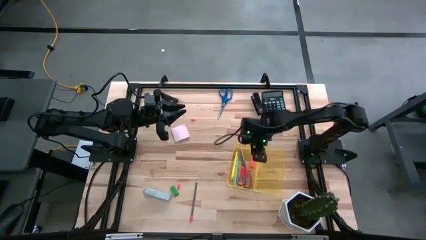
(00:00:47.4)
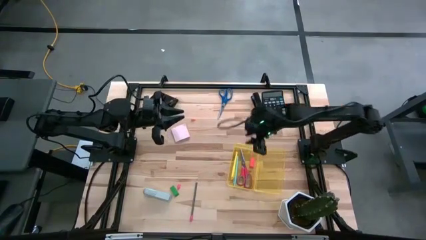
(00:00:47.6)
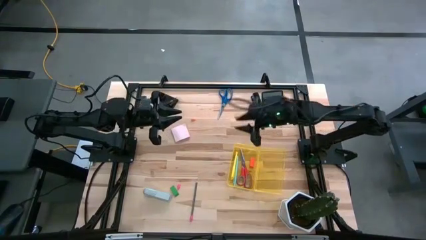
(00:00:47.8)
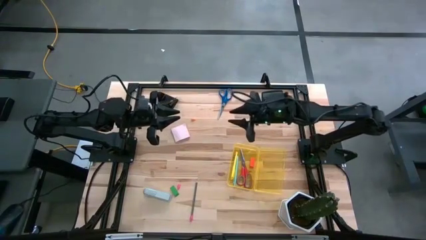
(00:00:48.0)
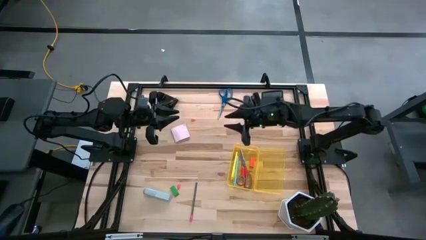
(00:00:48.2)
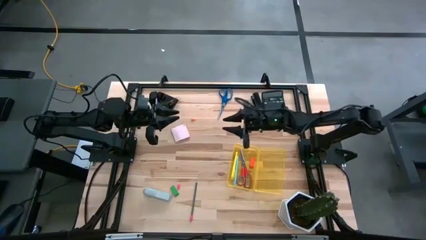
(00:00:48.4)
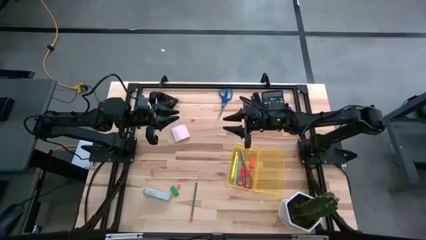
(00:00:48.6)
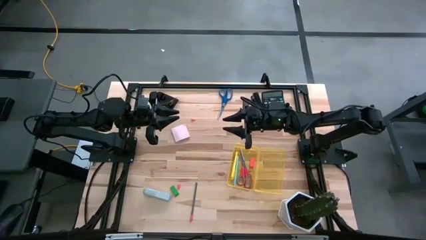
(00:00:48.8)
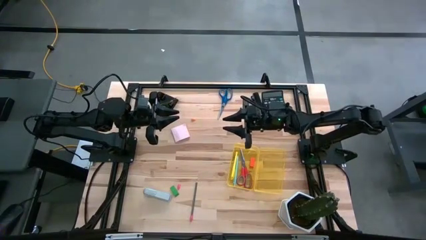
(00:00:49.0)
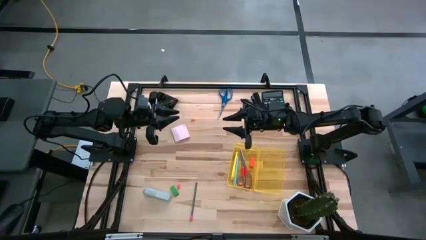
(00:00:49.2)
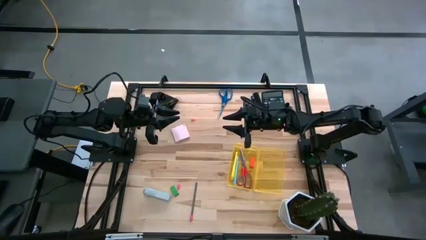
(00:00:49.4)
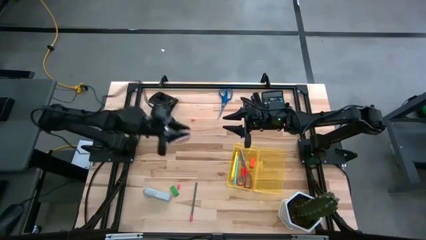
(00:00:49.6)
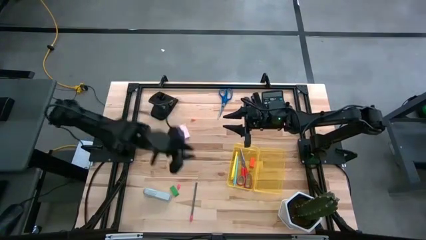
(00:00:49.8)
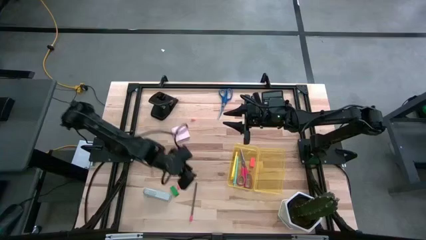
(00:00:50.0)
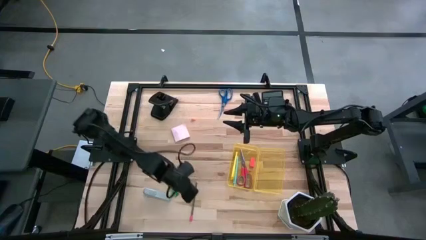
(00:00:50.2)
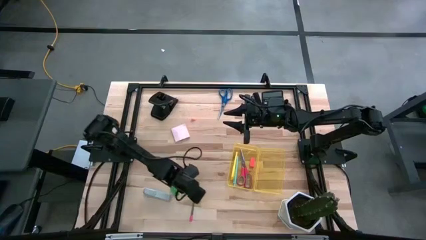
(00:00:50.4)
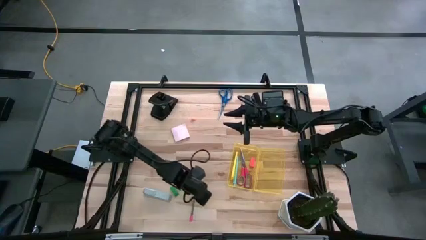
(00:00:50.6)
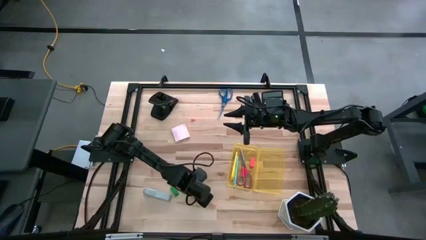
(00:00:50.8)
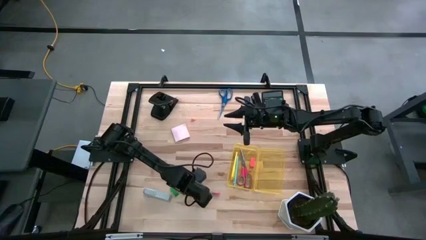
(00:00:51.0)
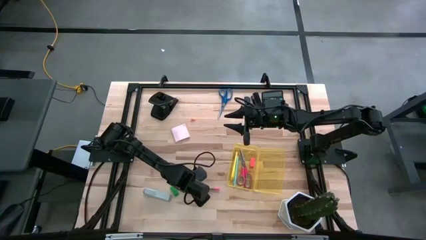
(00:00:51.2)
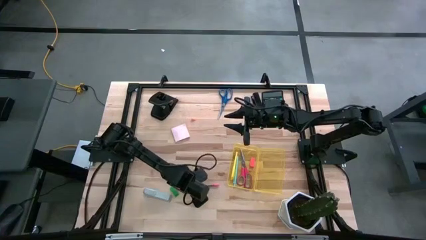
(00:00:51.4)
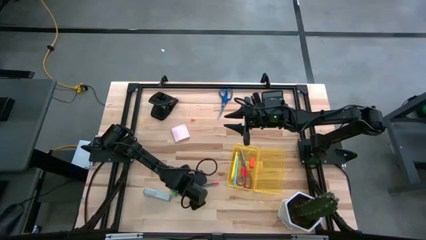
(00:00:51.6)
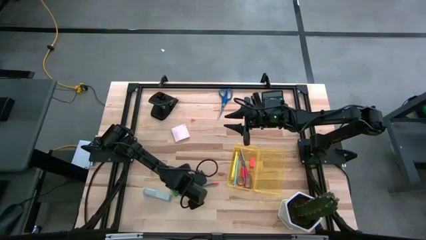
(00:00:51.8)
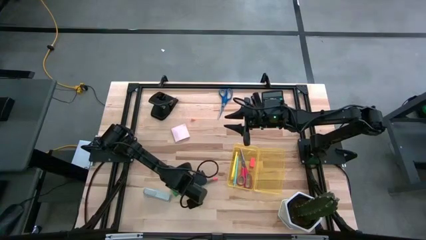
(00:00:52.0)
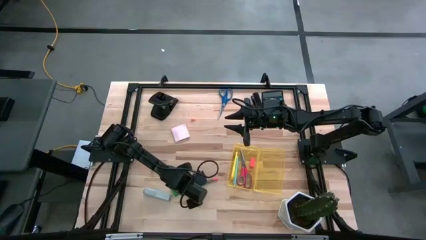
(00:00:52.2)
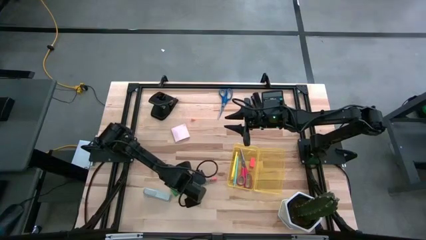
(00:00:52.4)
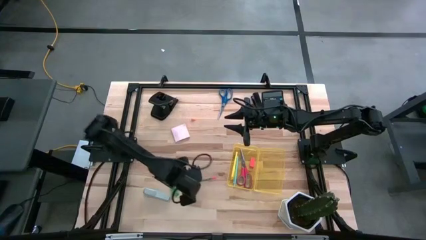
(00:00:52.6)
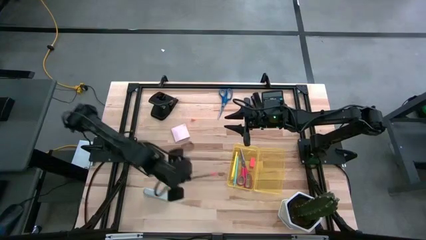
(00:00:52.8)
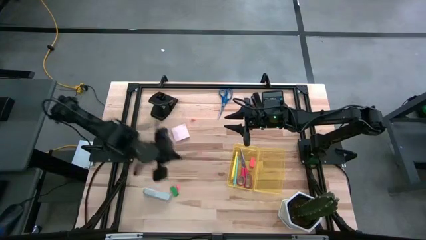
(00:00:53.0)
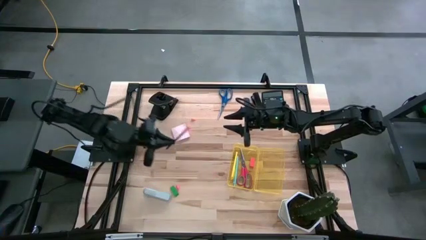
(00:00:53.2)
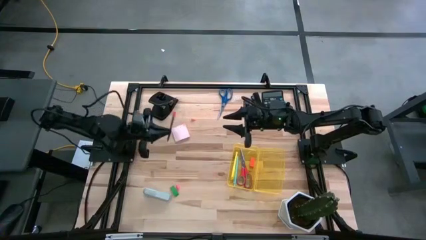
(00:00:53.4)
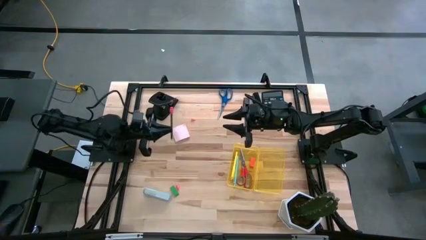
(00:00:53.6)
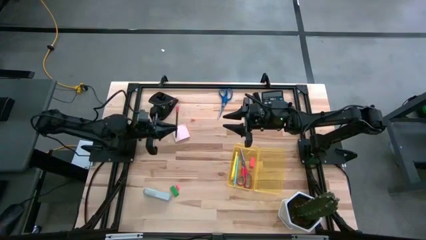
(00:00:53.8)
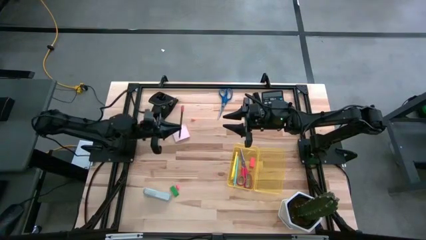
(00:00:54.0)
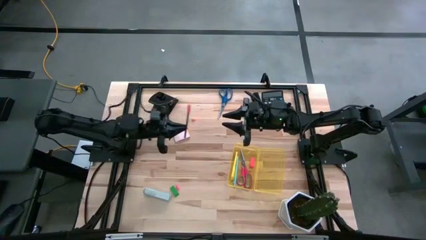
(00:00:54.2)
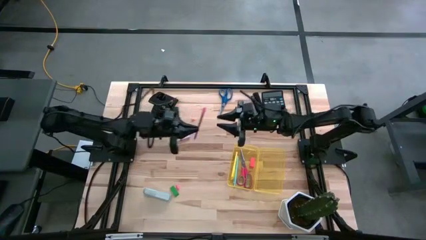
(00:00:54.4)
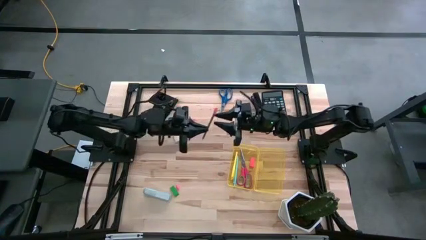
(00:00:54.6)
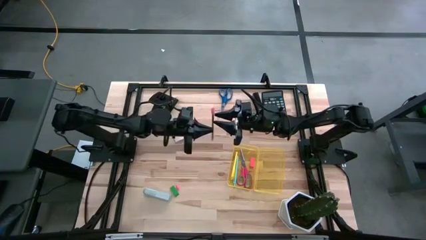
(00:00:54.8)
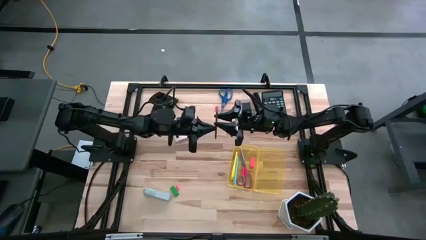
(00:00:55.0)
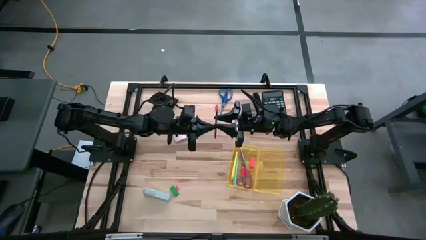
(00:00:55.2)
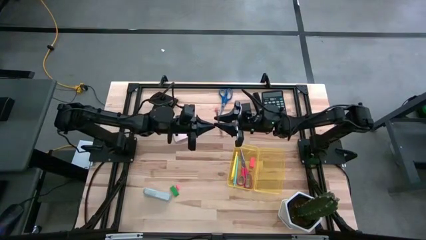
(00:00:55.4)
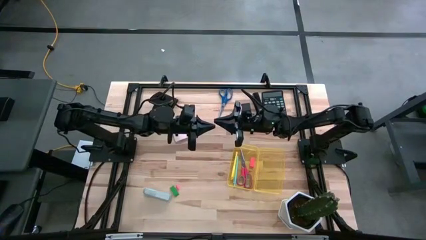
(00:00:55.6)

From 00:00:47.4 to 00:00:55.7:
Task: Pack school essentials
Put the black pencil into the supply box

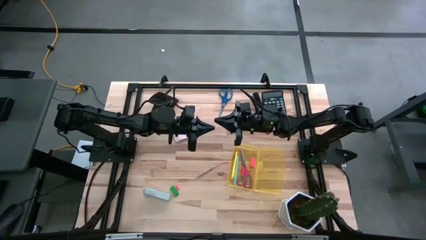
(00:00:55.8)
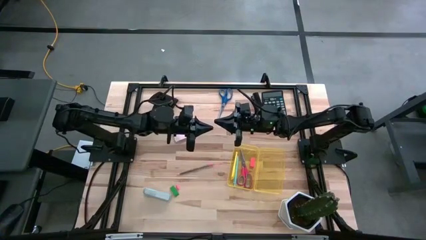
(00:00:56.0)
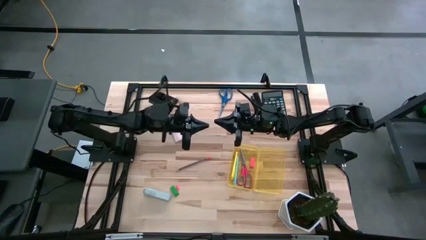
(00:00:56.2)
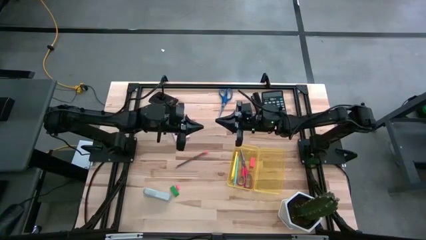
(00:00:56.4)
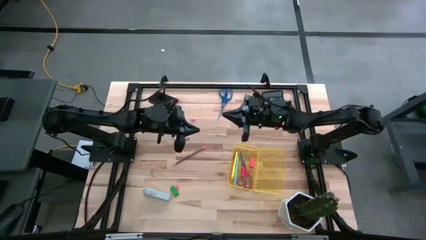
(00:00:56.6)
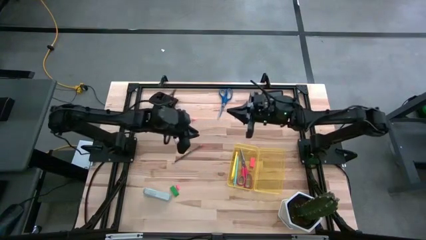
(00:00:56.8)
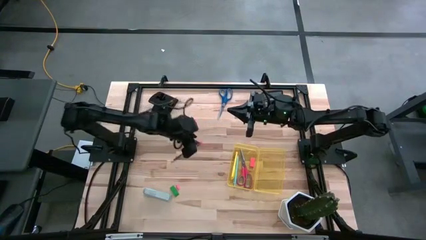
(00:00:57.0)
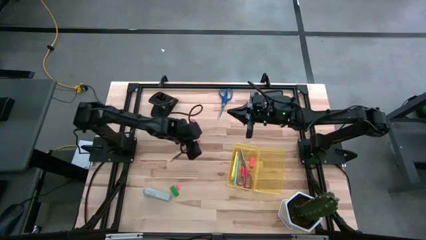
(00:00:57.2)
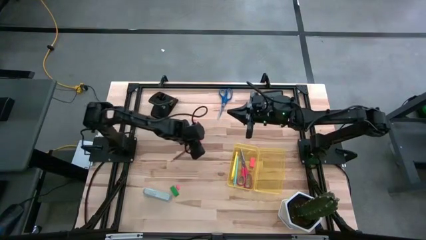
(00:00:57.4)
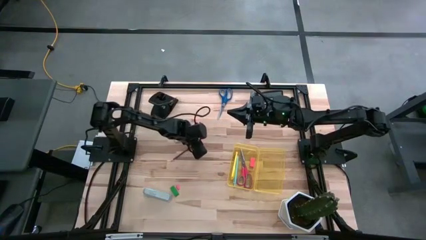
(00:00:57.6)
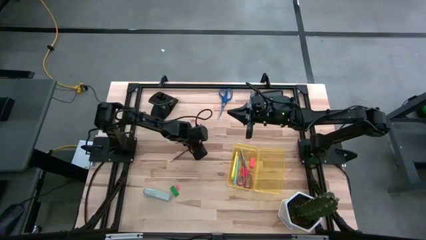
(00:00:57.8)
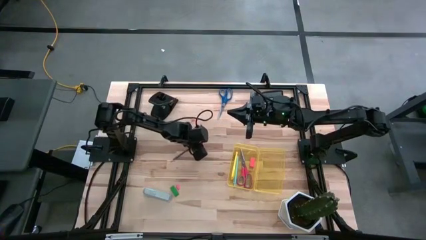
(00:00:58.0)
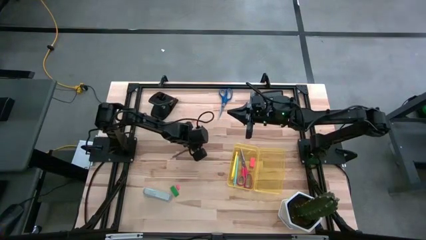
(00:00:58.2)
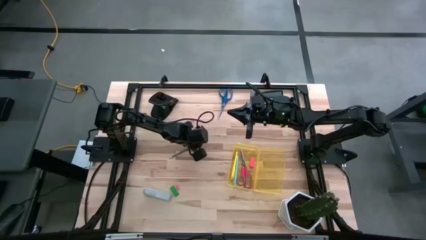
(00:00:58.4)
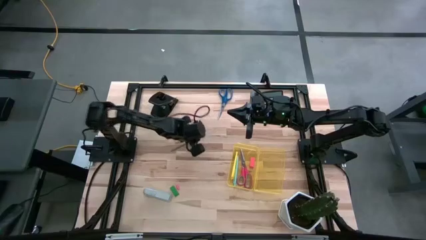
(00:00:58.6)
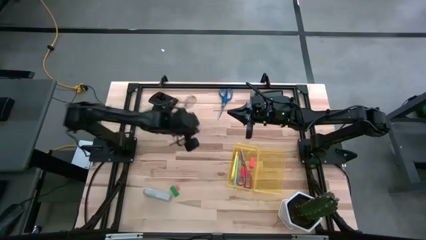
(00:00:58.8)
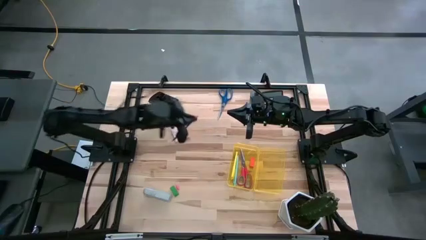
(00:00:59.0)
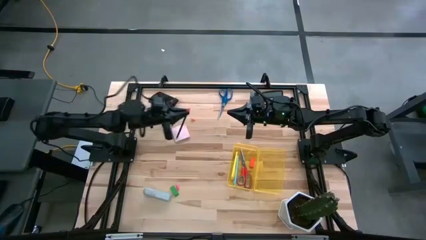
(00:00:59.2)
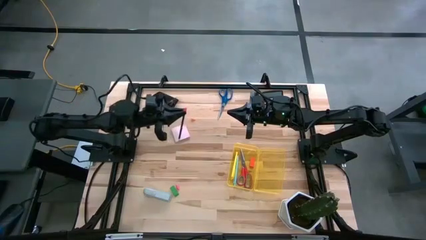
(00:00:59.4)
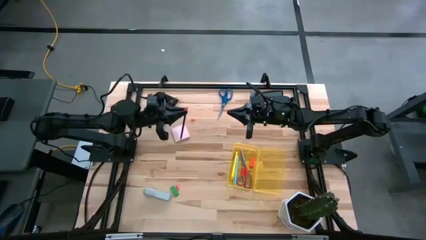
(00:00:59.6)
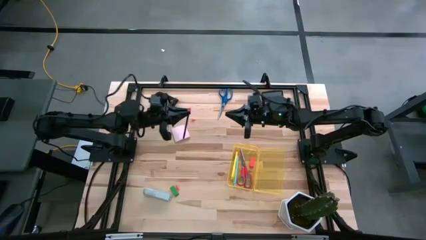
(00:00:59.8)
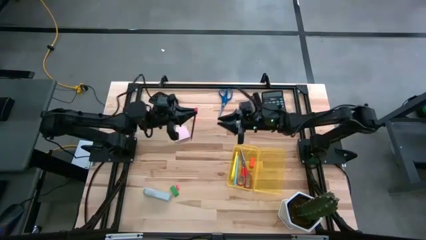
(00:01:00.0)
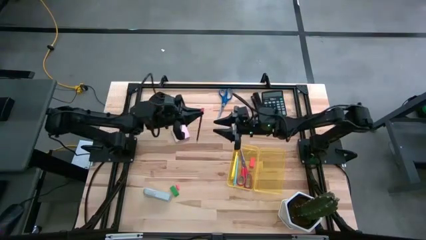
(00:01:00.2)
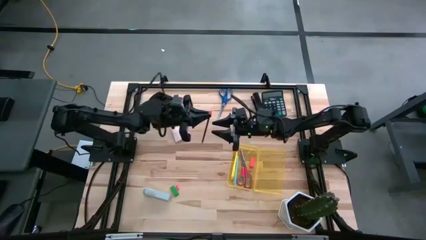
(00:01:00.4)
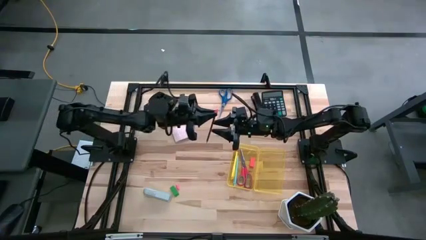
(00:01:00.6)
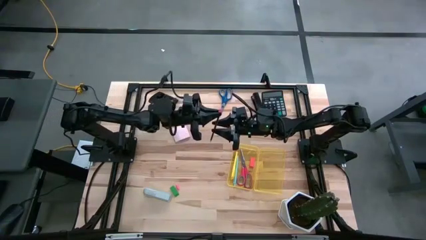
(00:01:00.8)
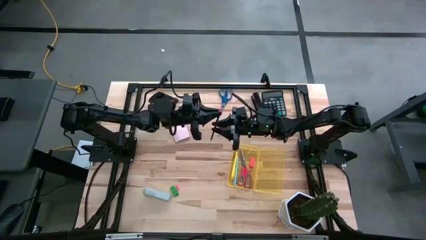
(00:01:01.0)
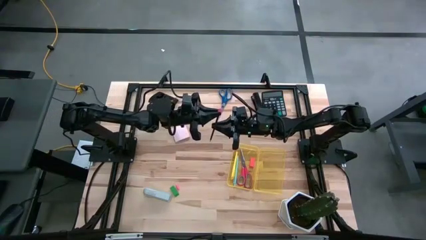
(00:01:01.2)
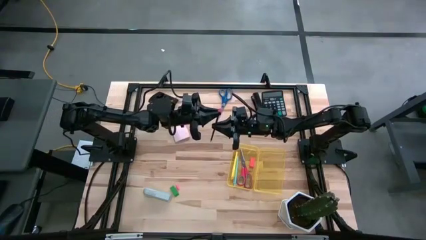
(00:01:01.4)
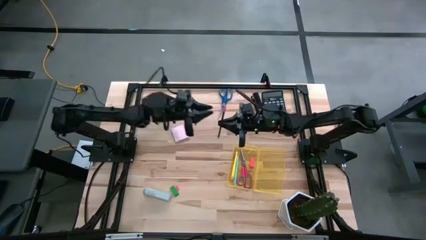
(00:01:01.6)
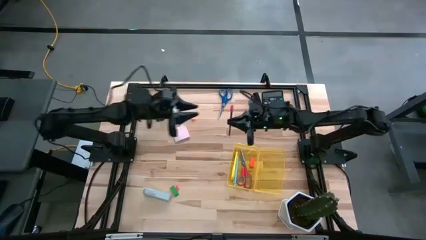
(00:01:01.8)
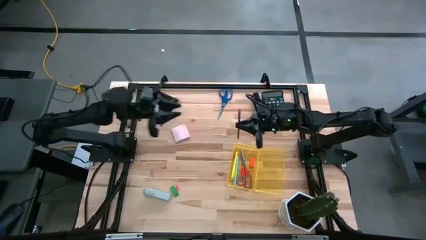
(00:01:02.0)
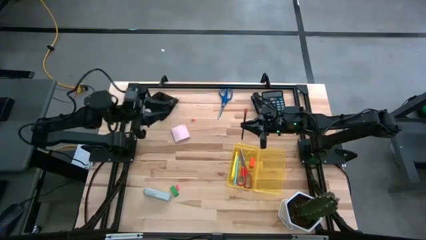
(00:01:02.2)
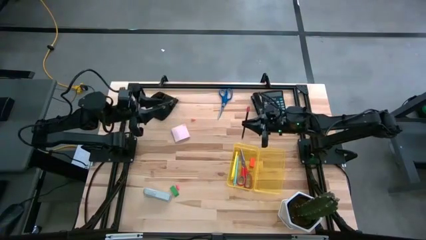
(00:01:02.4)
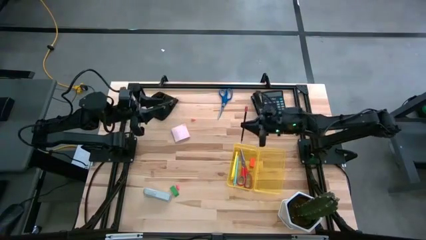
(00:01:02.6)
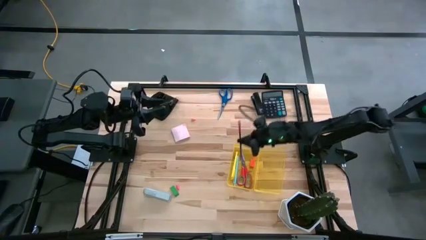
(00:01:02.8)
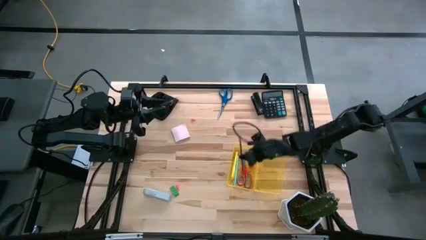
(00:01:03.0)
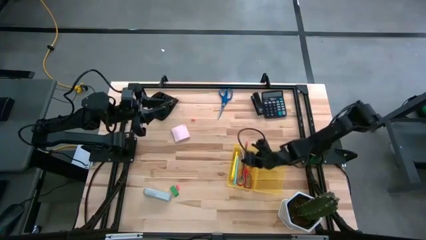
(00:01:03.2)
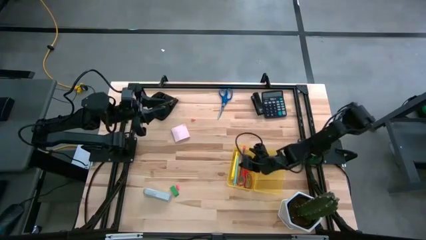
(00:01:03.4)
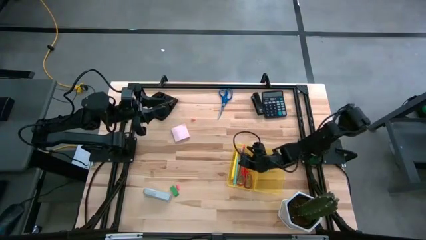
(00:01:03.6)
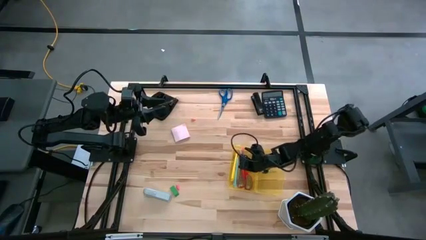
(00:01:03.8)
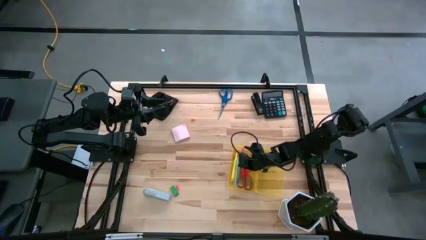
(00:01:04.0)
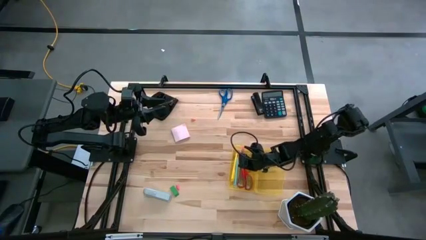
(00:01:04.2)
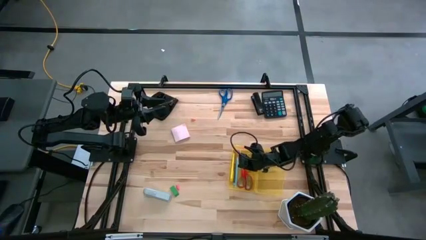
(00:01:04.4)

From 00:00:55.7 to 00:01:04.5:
Put the black pencil into the supply box
